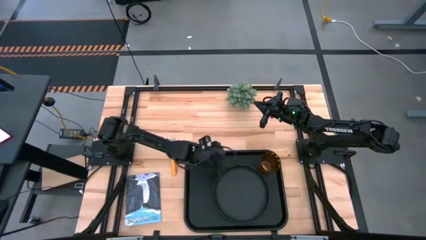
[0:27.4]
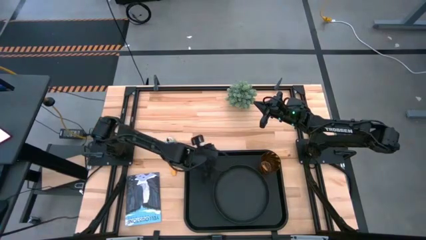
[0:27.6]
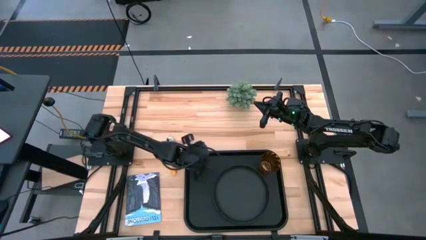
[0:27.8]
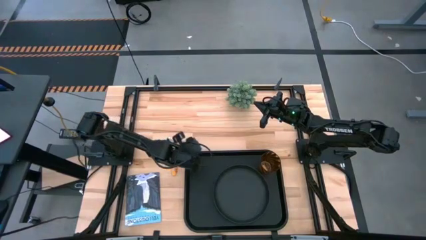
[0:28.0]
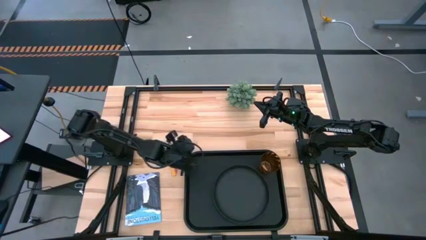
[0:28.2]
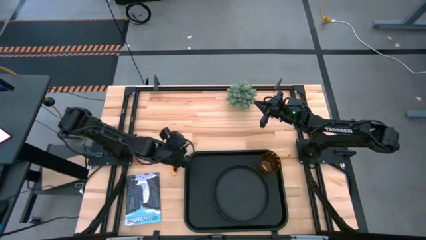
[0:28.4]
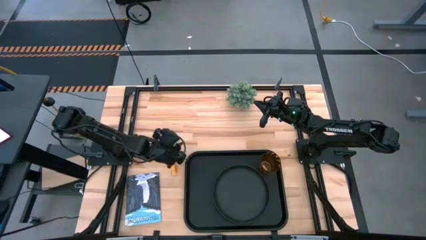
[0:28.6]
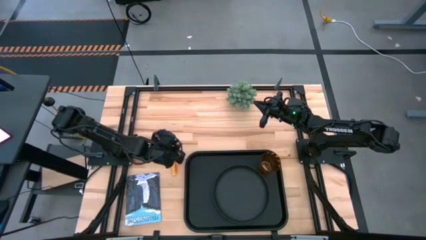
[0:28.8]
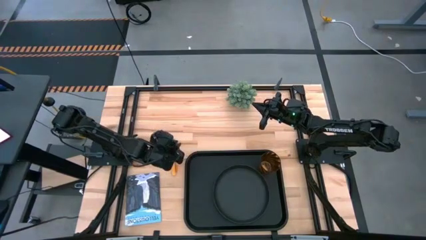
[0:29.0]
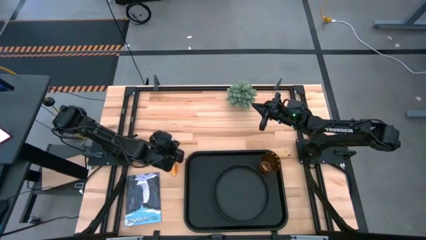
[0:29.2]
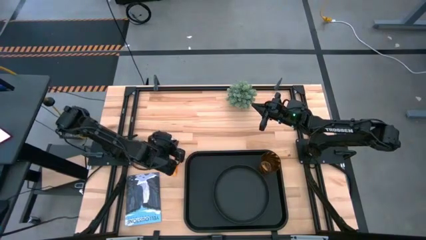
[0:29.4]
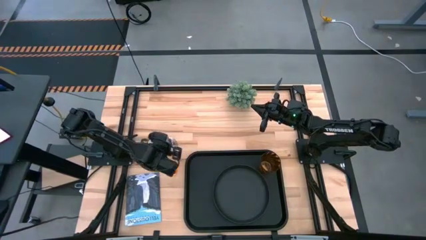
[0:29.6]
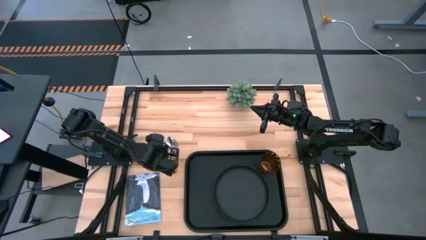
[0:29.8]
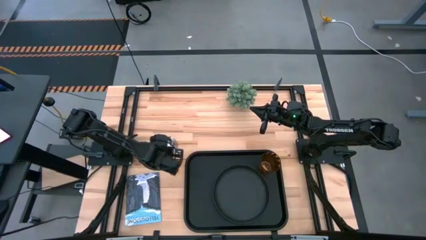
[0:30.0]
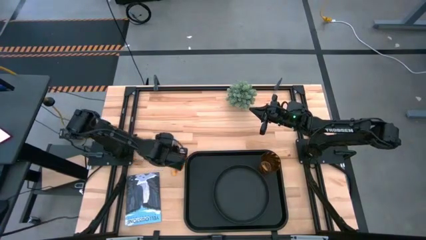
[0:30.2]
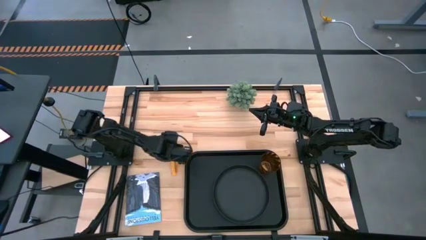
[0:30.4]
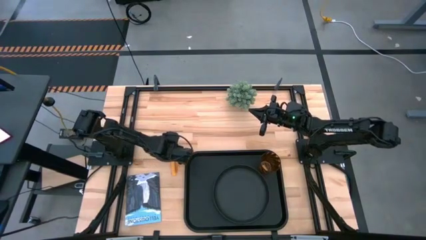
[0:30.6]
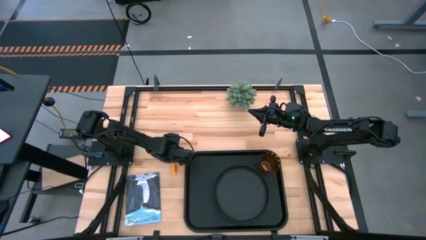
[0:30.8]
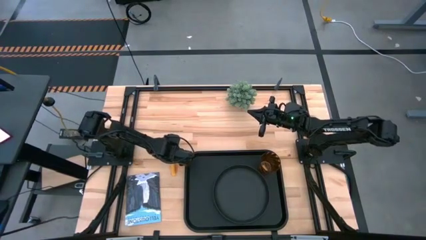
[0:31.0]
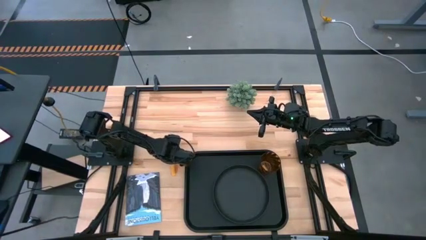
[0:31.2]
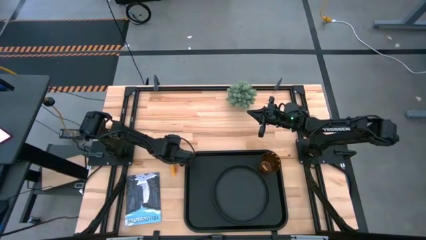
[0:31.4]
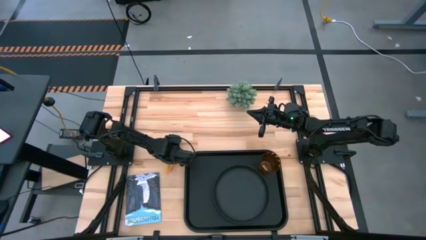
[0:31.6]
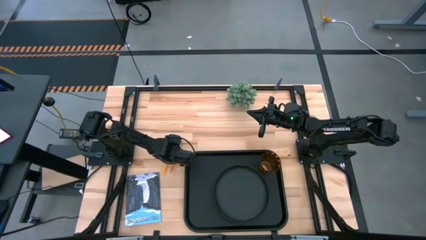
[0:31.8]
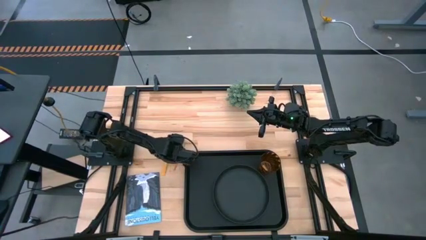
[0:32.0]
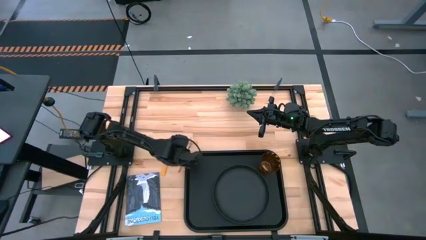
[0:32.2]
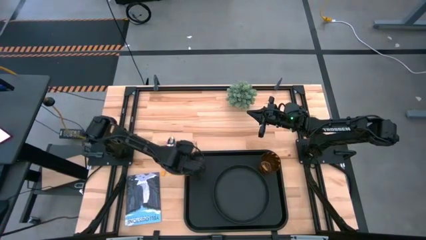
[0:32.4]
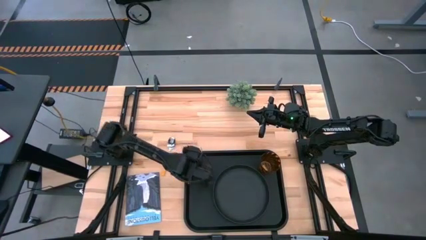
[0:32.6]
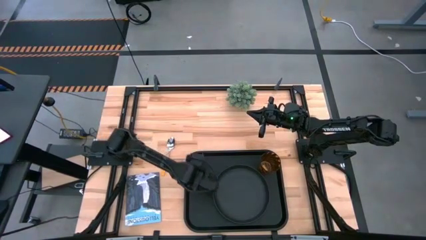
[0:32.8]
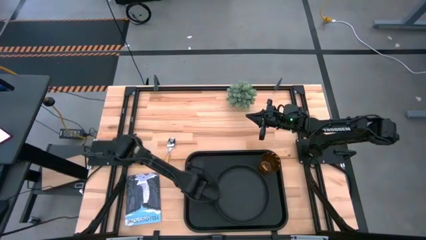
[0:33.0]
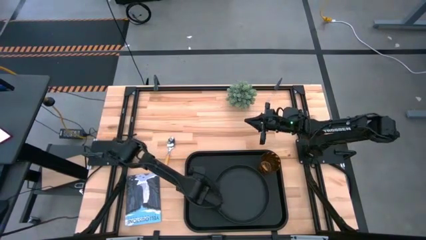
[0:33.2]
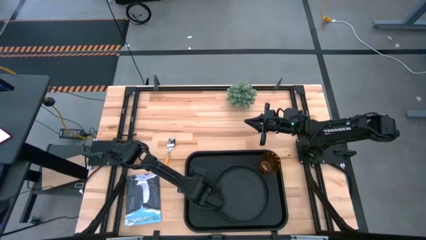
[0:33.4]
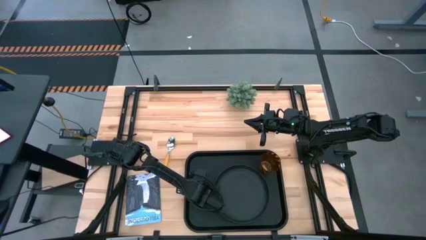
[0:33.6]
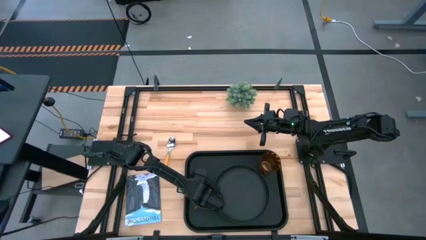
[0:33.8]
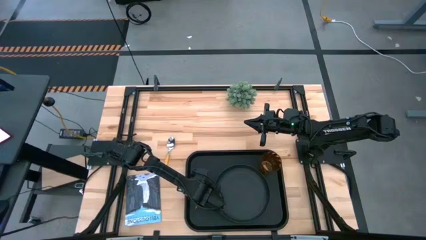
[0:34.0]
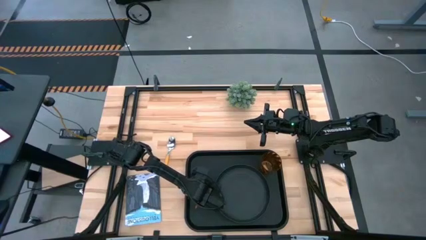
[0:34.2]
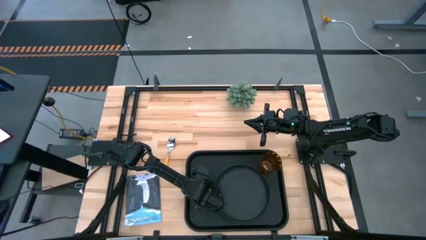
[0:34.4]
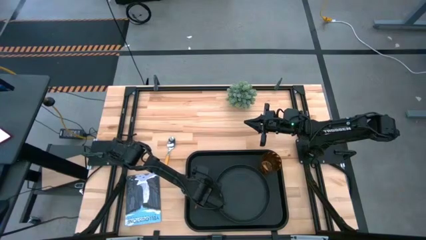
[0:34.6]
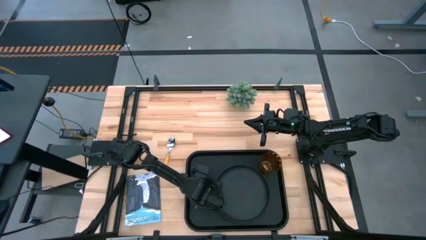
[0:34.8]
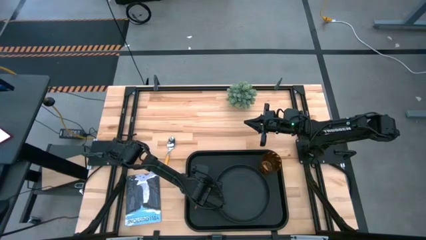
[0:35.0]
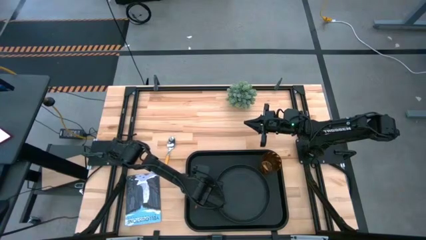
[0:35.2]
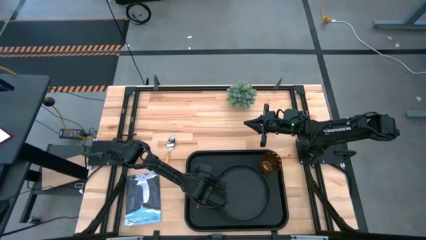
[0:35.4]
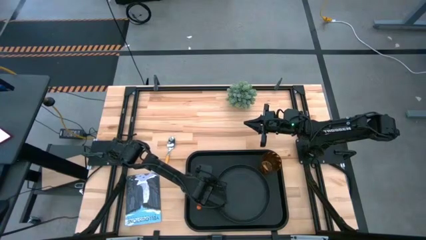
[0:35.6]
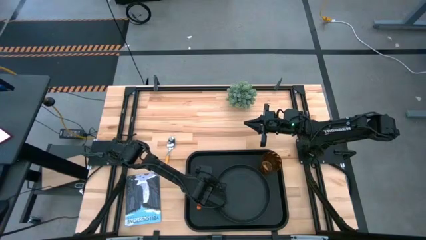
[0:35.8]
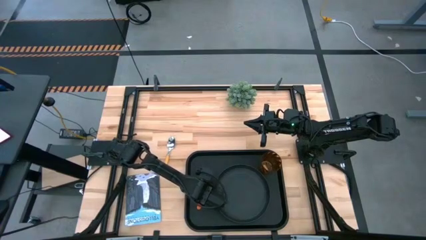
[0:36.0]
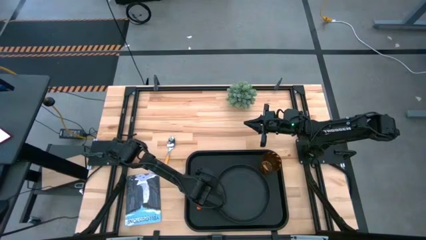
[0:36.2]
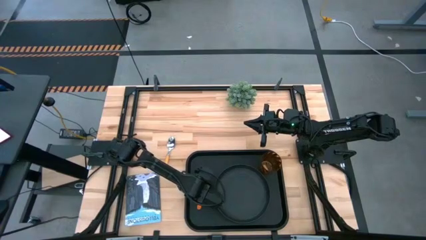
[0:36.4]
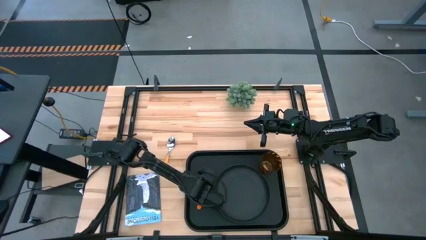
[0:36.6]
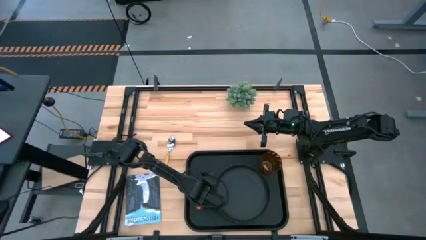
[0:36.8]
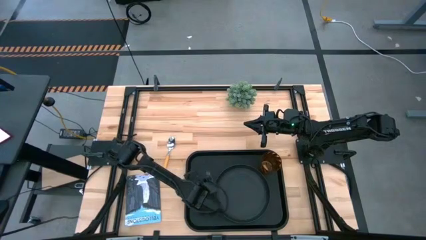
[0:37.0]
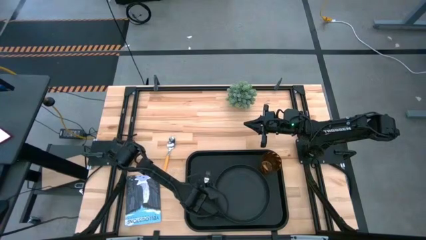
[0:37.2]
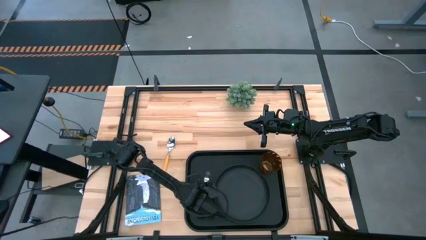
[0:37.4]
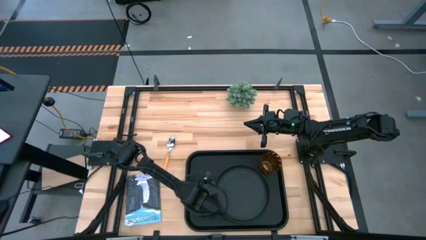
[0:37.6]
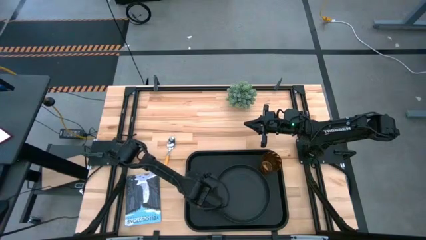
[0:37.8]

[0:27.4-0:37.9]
Task: Pick and place plate/cup/fork/spoon on tray
Put the orange fork on the black tray to the right side of black plate

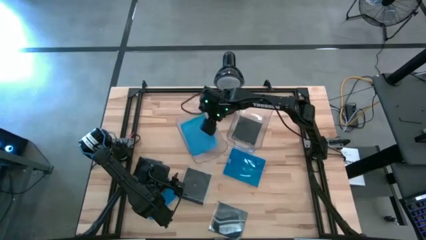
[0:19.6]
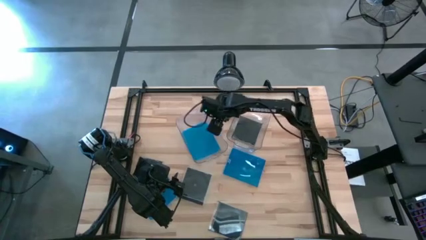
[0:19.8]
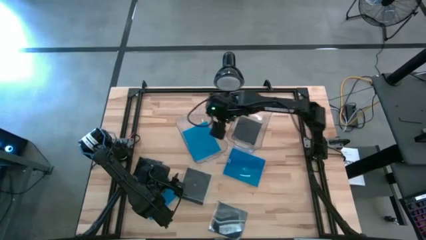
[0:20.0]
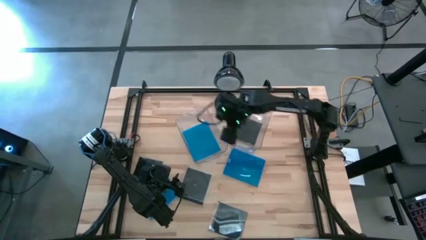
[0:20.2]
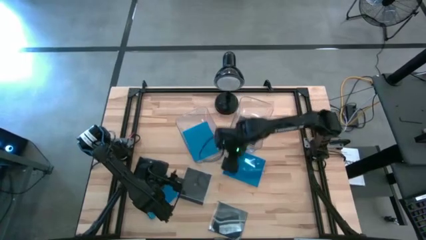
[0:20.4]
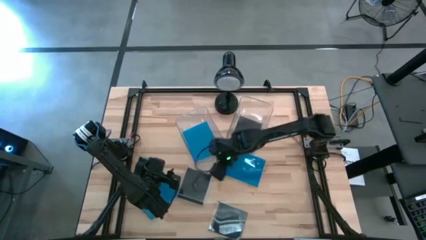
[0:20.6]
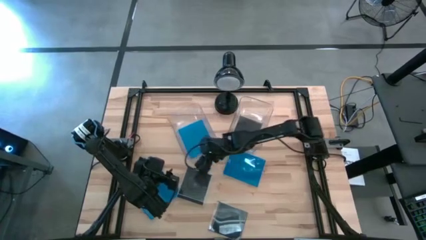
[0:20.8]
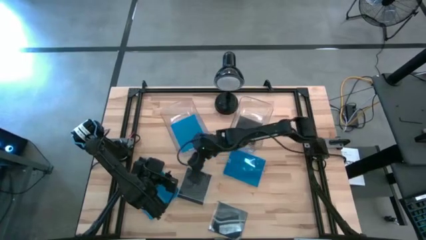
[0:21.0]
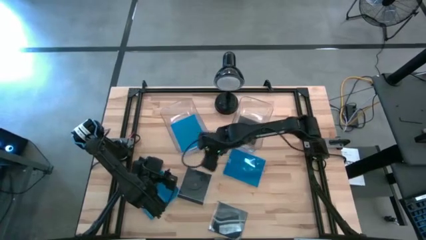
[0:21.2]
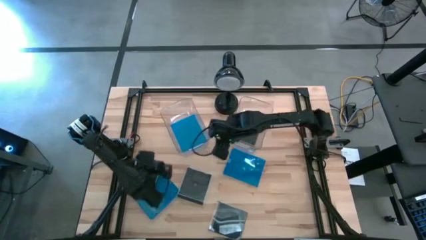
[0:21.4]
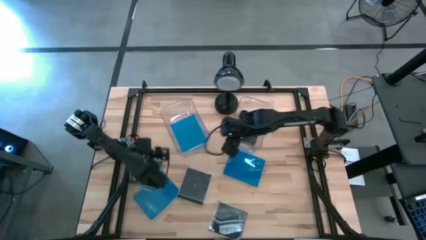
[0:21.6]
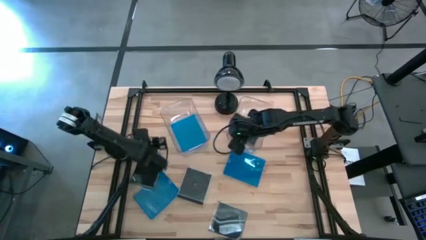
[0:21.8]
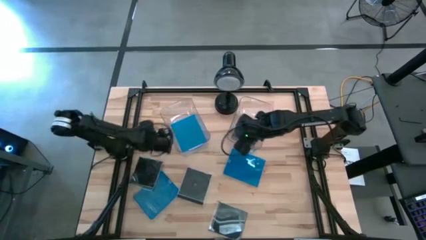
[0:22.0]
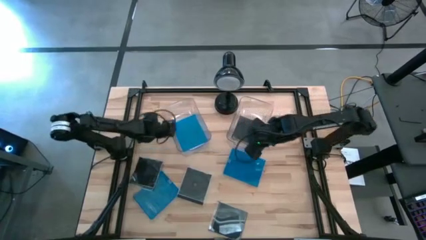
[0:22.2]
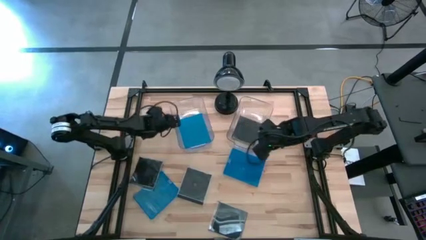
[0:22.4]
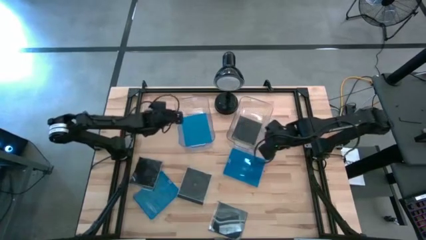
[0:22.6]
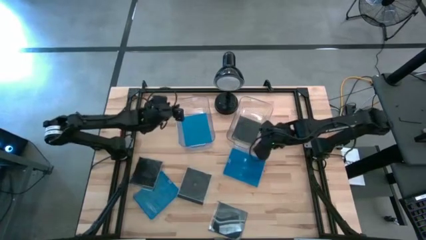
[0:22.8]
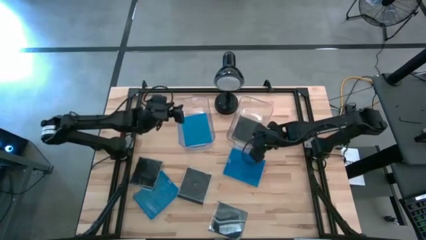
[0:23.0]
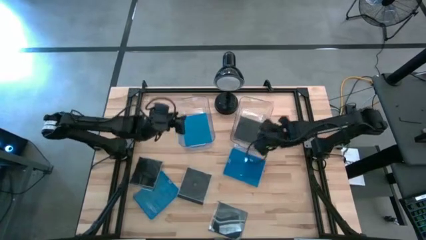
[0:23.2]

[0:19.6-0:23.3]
Task: Pick & place jewel cases by type
Adjust the transparent bins

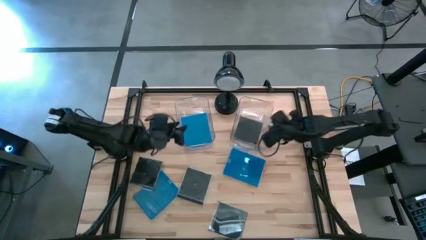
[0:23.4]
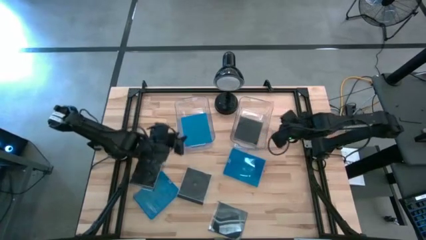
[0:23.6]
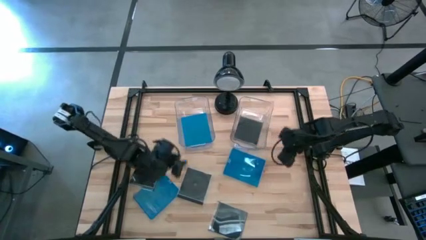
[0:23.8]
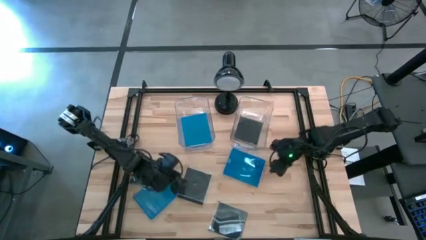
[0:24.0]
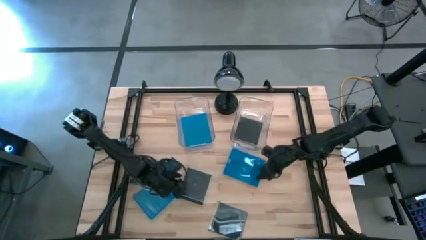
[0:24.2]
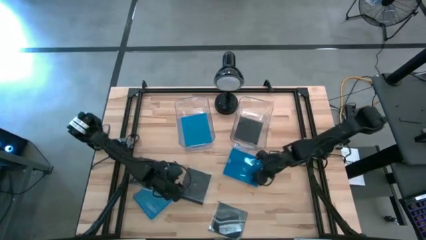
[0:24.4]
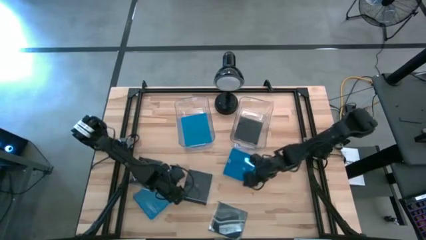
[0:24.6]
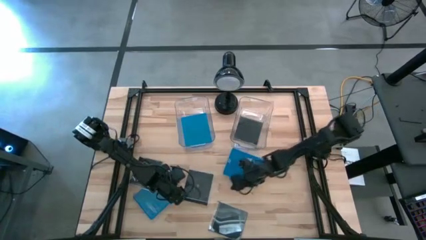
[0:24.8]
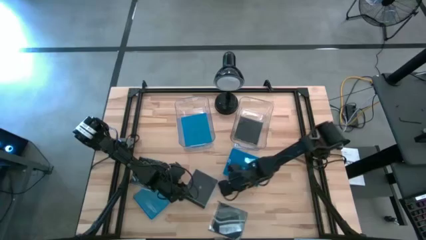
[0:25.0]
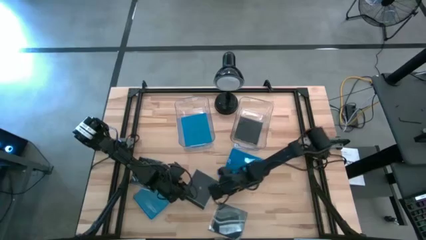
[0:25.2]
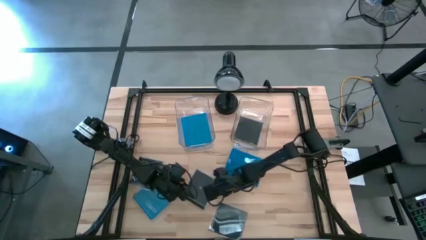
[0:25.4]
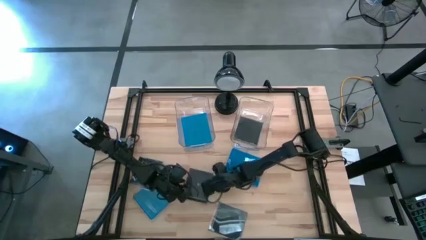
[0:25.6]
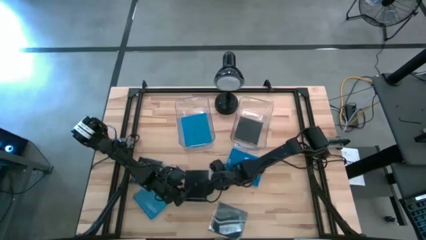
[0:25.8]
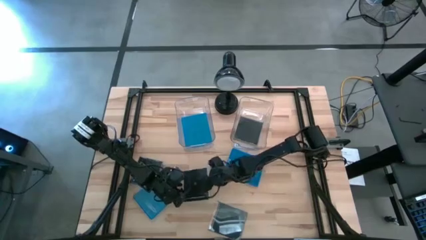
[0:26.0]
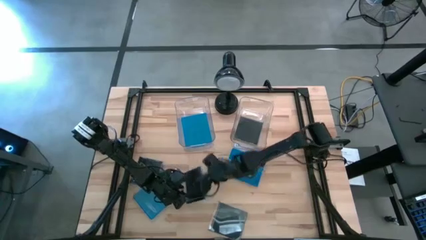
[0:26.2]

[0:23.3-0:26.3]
Put the black CD case into the right transparent bin
